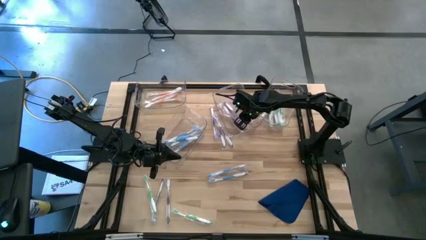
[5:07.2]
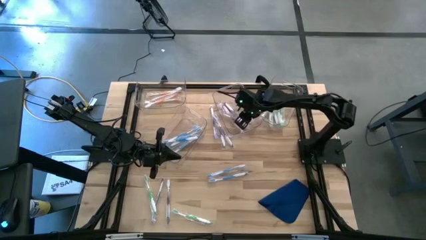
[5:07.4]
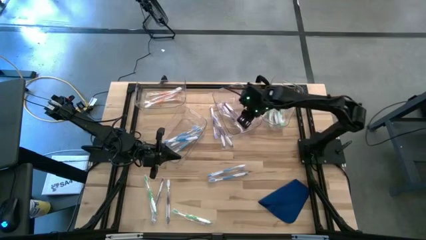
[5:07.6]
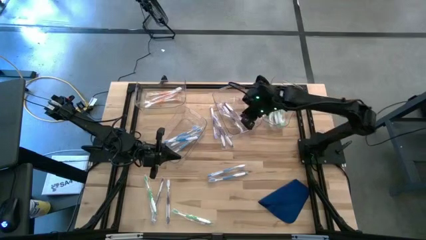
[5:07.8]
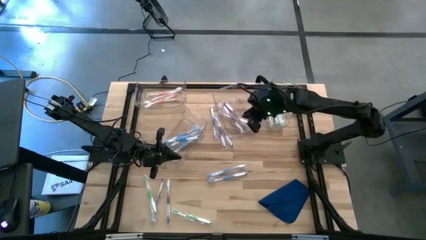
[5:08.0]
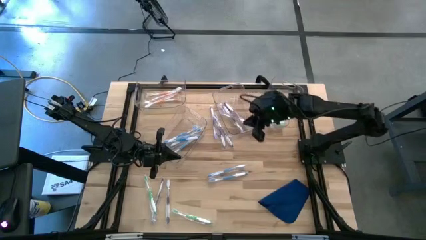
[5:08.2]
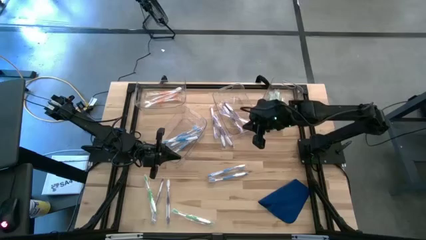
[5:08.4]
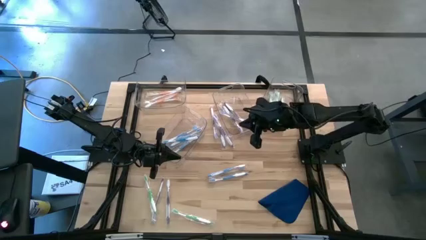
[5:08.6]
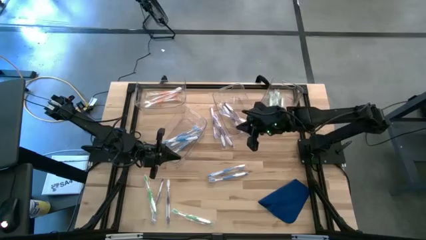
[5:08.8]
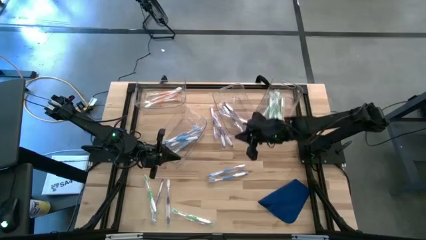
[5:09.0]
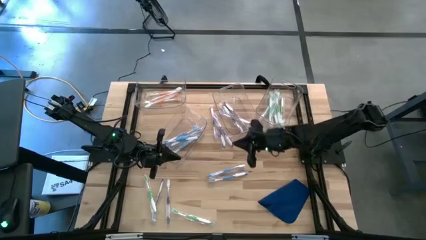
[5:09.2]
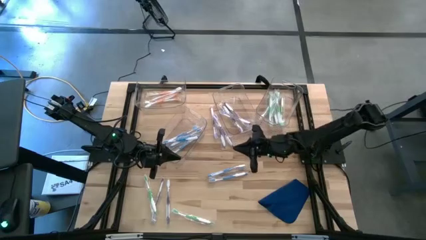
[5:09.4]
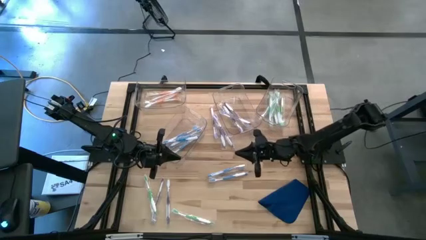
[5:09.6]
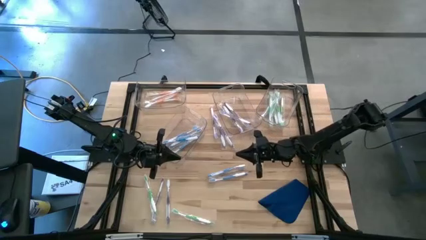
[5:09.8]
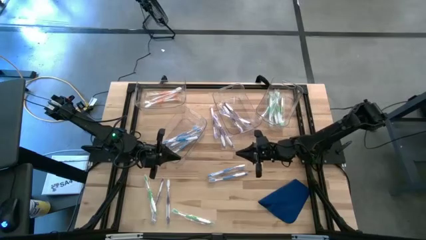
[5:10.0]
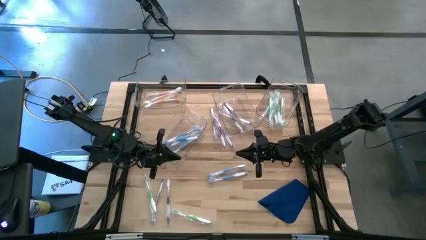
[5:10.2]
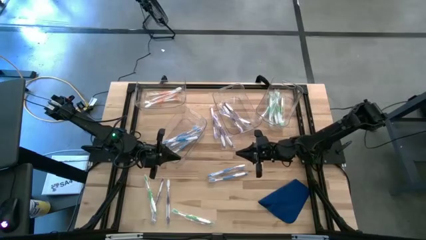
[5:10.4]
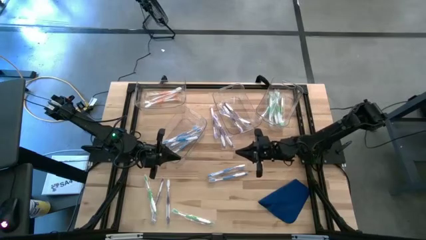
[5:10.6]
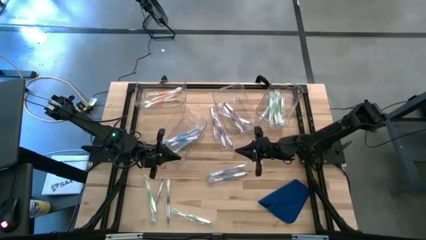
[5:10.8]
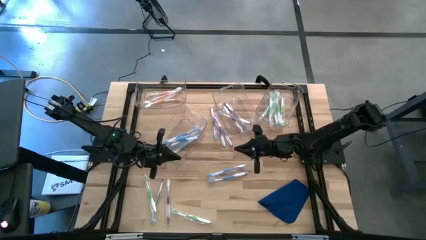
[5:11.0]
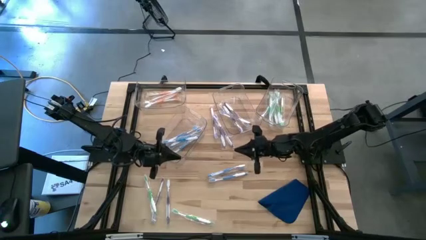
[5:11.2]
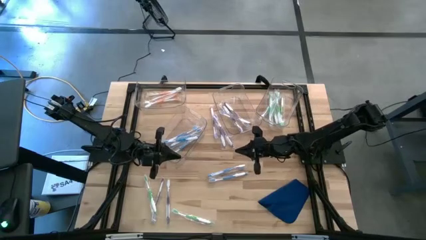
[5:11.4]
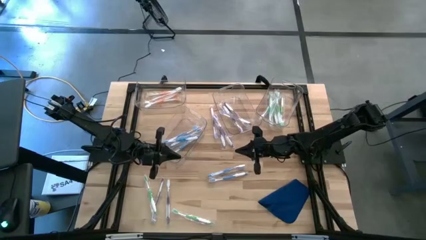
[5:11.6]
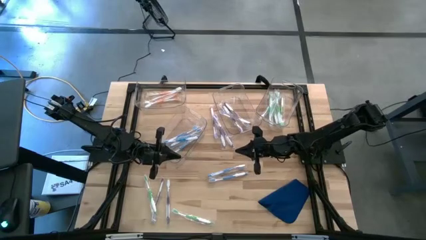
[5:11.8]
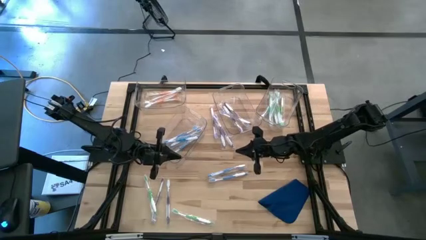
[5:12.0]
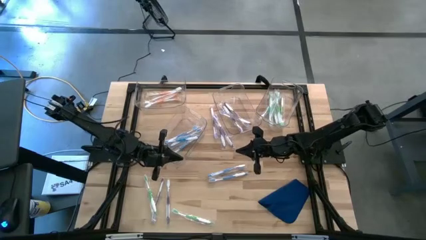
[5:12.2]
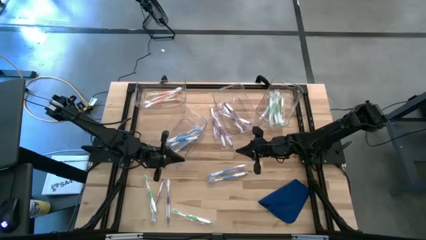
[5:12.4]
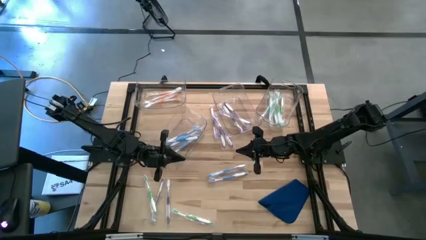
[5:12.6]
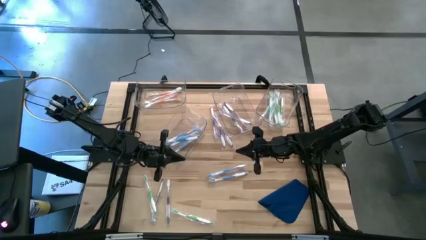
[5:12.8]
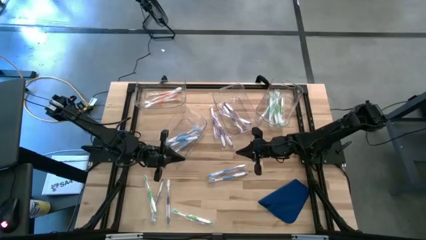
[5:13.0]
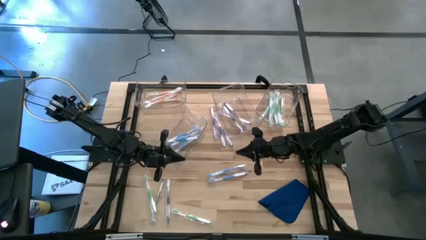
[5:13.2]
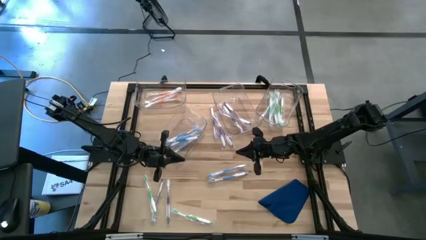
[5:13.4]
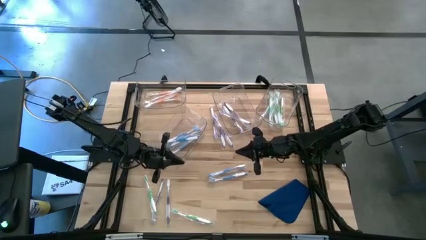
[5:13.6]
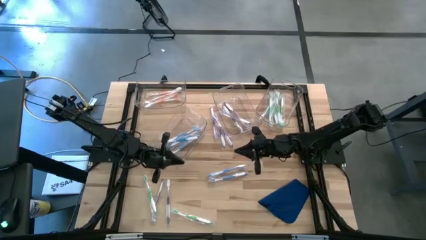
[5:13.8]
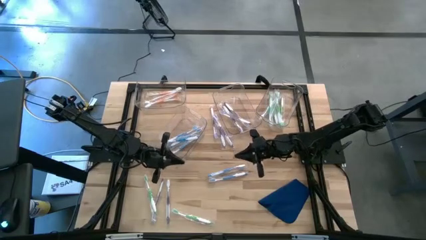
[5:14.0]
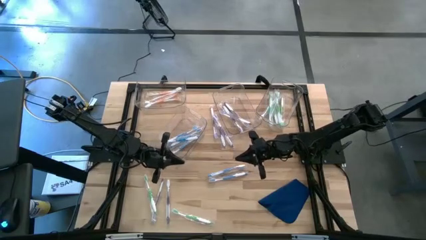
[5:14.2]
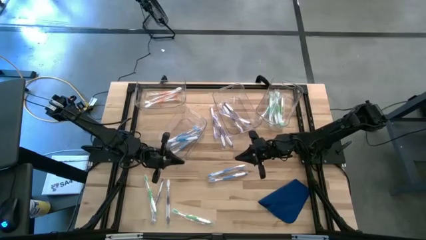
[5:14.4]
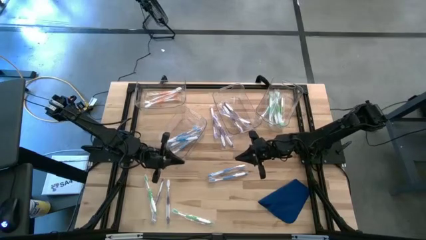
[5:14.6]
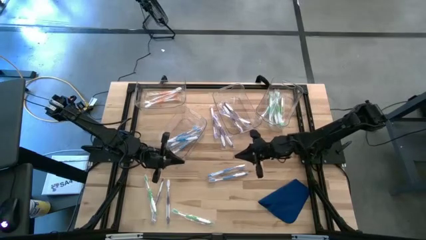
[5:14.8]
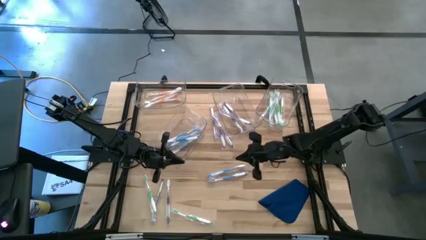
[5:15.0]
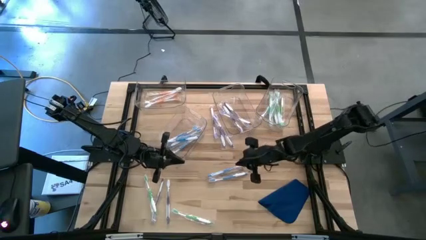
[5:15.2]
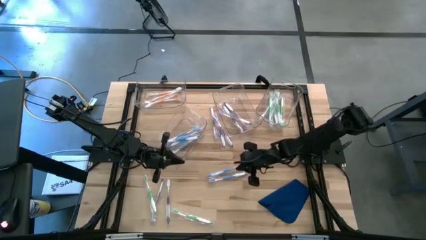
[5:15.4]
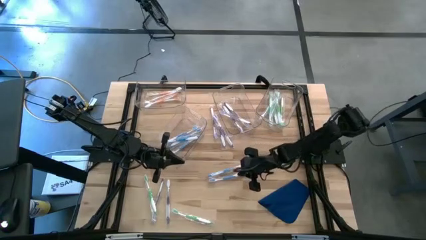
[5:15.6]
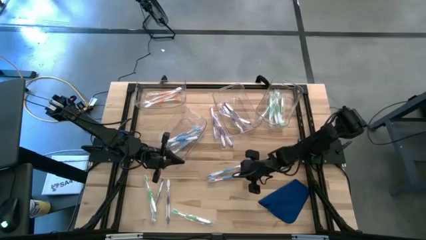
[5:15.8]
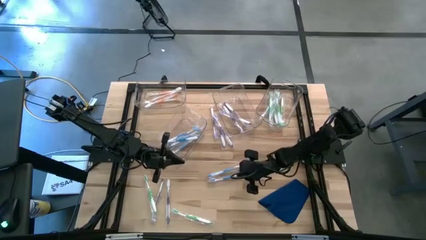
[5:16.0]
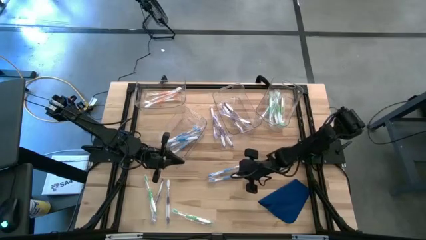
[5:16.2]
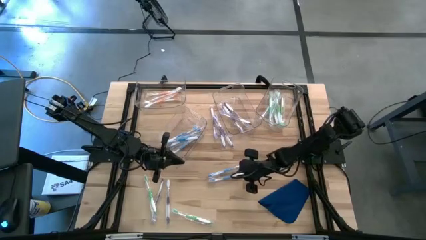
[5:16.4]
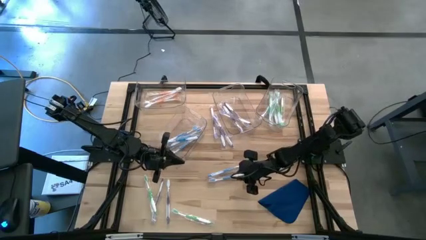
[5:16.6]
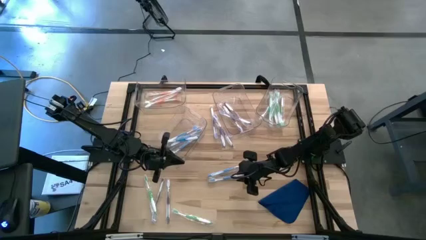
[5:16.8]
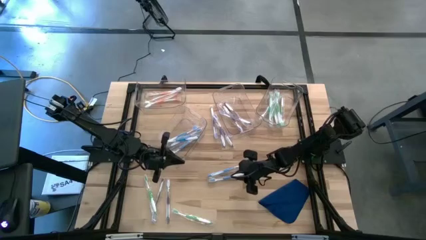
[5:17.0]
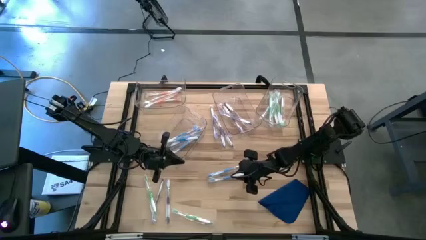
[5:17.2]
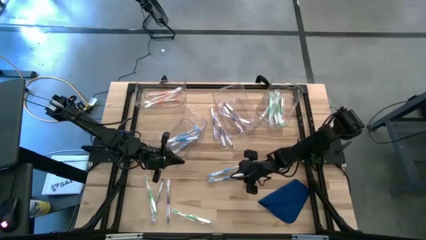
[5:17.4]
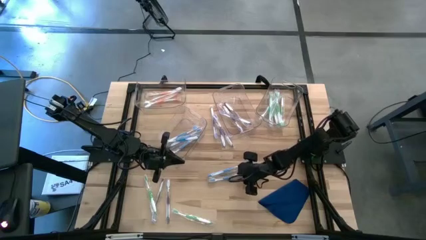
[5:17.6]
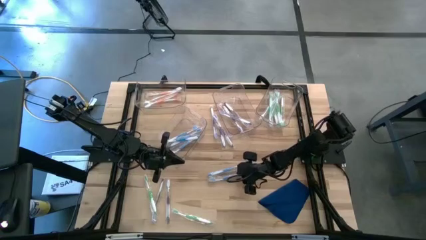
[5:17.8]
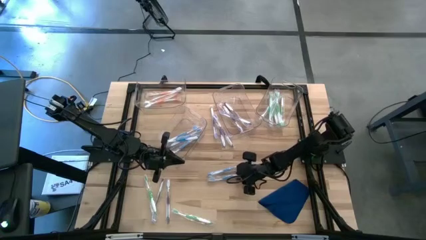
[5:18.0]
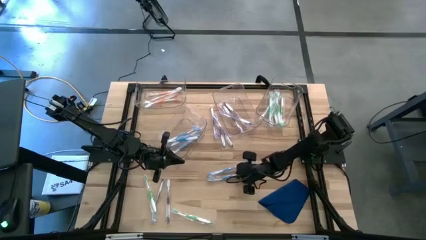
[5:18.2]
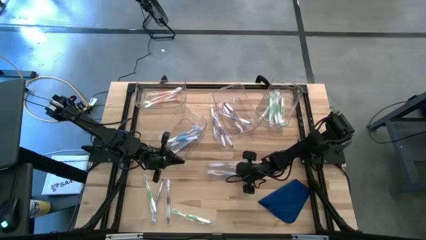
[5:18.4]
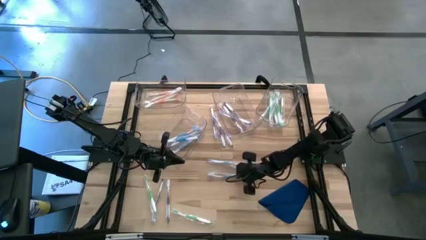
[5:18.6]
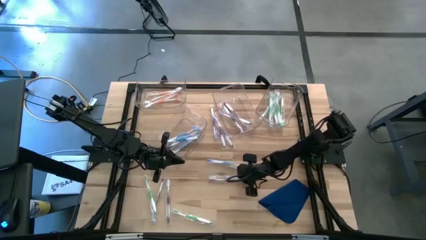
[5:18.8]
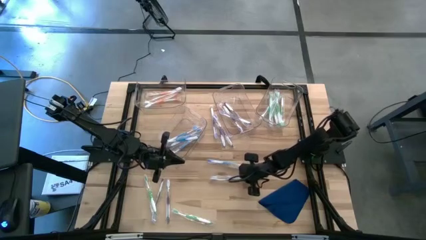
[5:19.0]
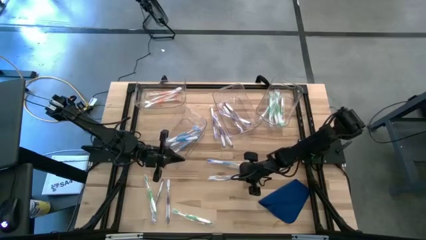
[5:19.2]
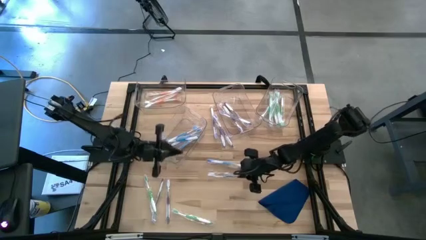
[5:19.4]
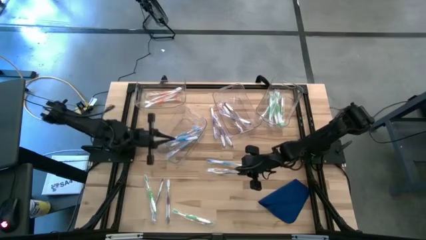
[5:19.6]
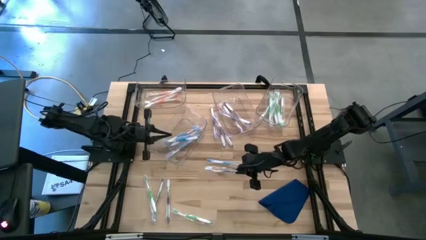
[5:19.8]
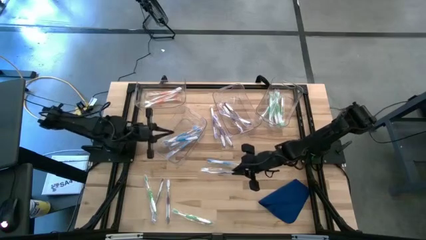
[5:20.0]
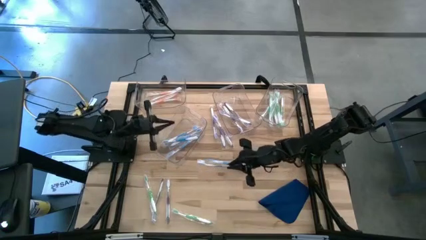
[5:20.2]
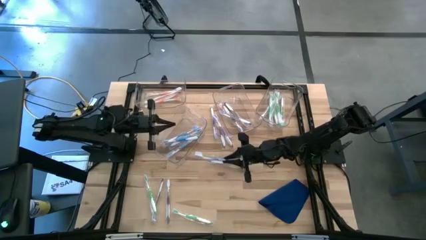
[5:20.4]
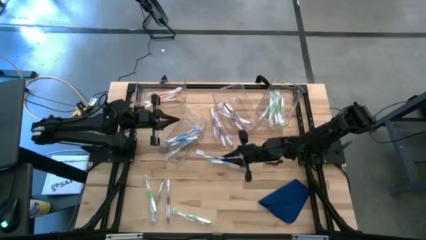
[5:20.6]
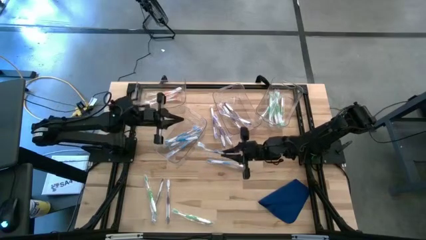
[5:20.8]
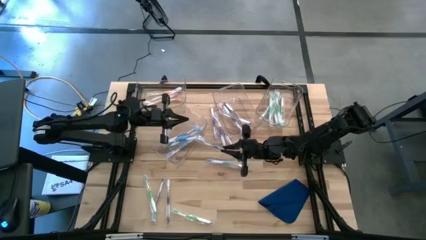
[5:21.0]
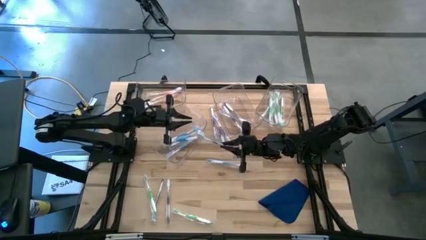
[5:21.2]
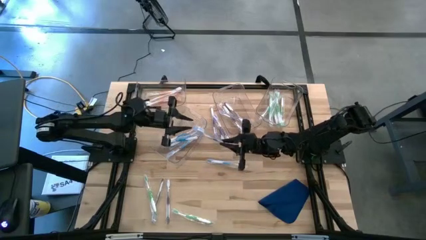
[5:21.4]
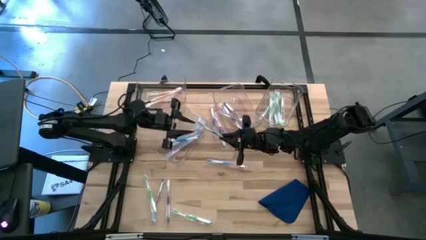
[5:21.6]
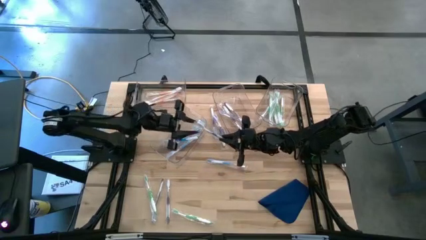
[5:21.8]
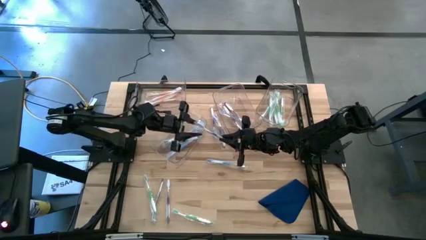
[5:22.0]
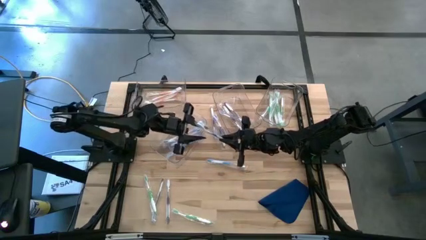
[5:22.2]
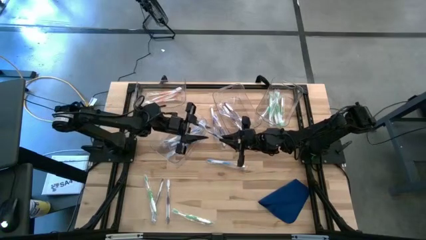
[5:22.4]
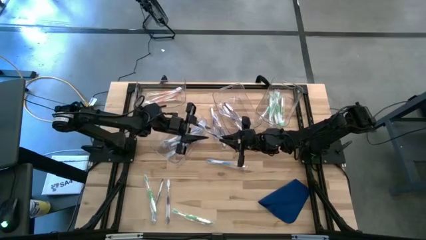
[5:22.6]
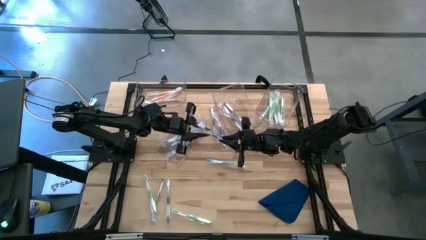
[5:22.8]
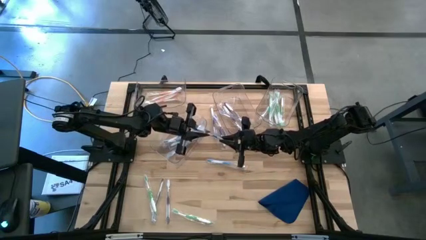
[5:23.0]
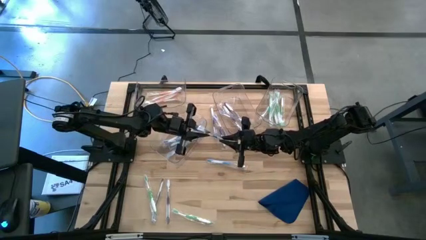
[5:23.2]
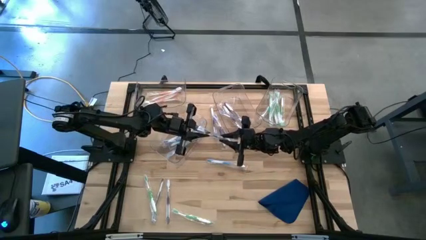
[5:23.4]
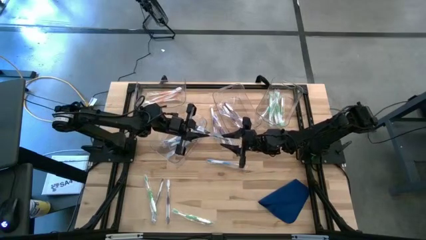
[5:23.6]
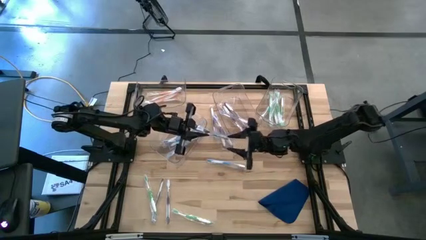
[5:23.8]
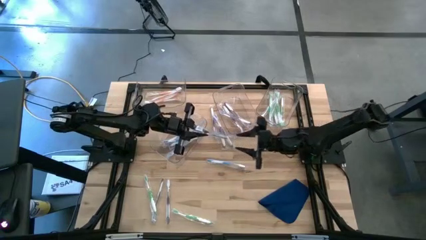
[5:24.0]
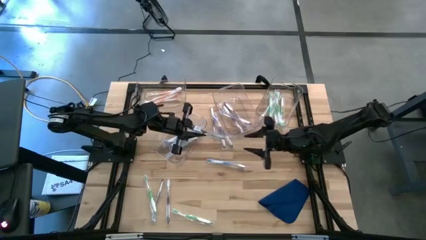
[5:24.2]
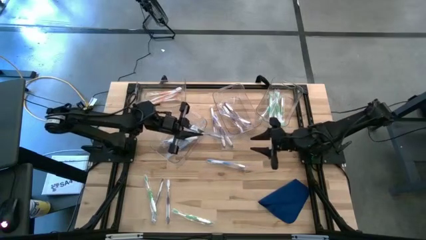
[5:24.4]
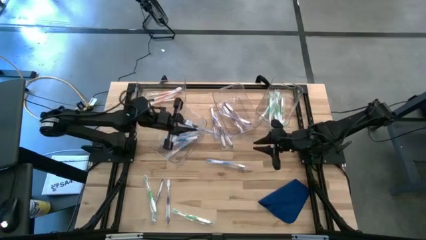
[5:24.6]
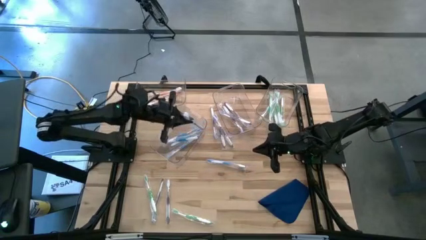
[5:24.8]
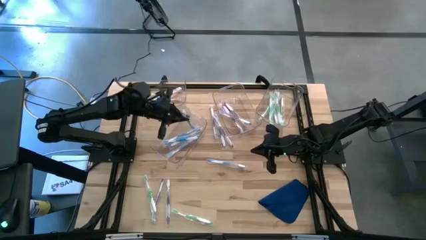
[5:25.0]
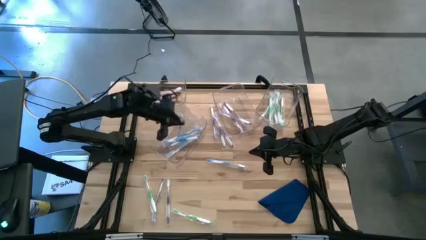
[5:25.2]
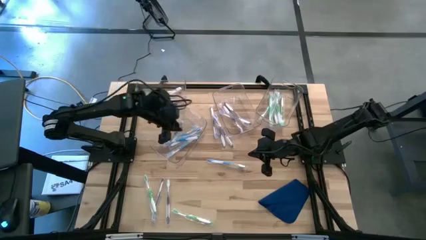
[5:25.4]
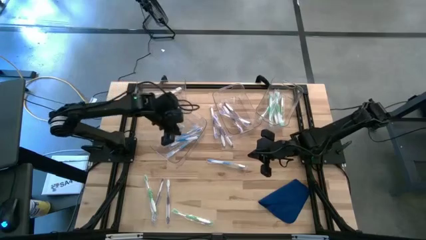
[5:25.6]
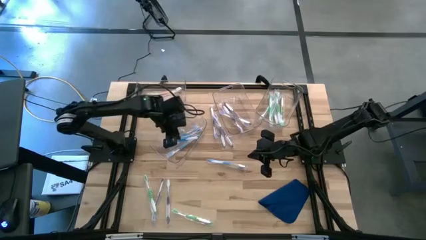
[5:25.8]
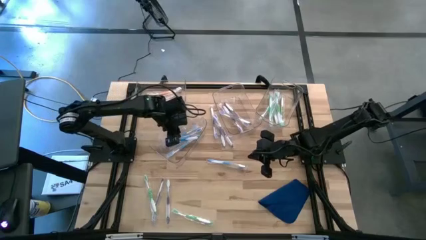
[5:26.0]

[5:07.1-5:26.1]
Task: Pick & Place Toothbrushes
Put the blue toothbrush into the bottom transparent bin
